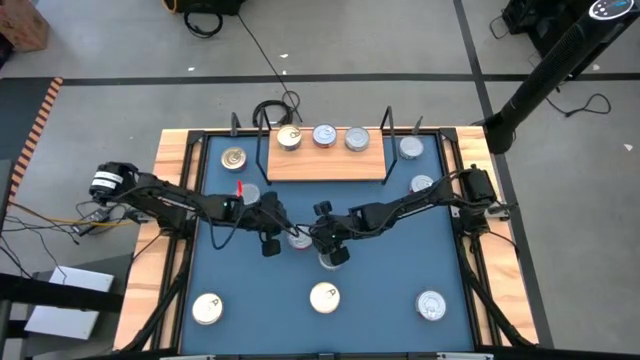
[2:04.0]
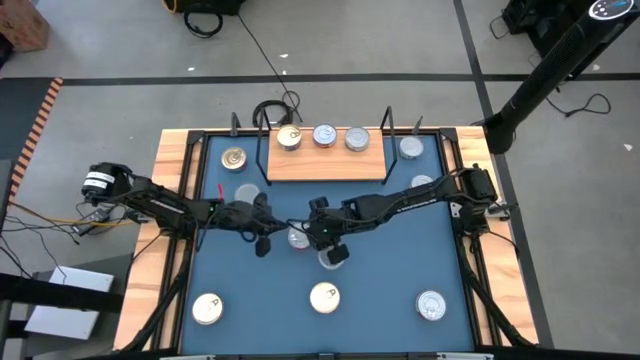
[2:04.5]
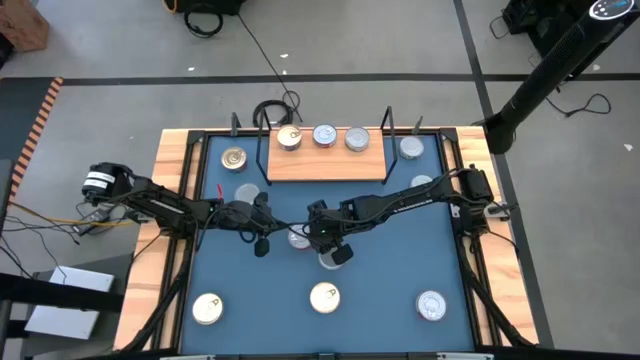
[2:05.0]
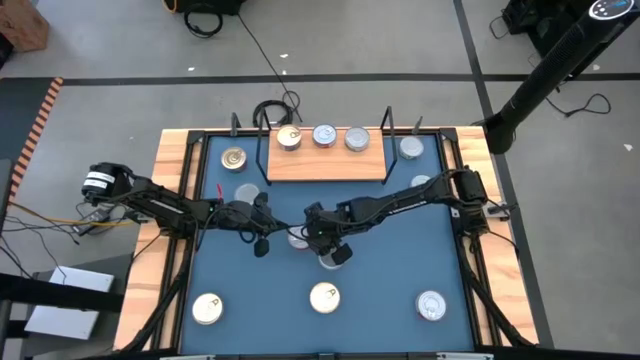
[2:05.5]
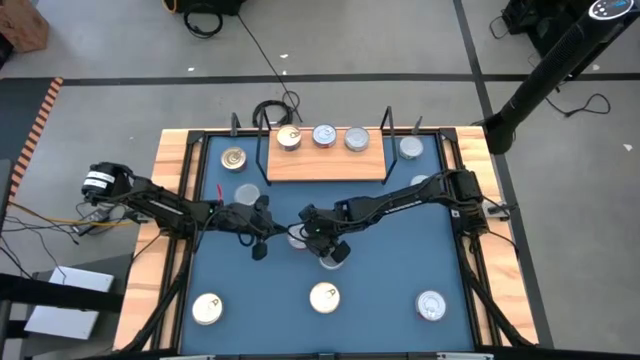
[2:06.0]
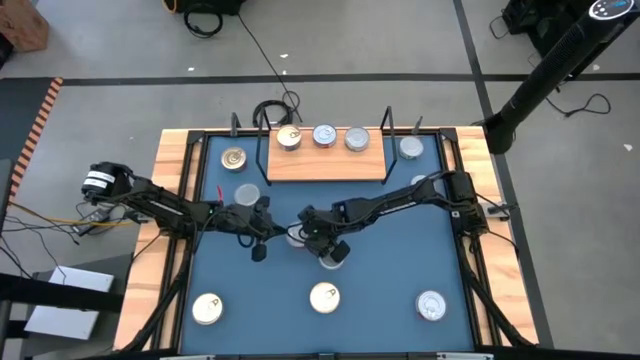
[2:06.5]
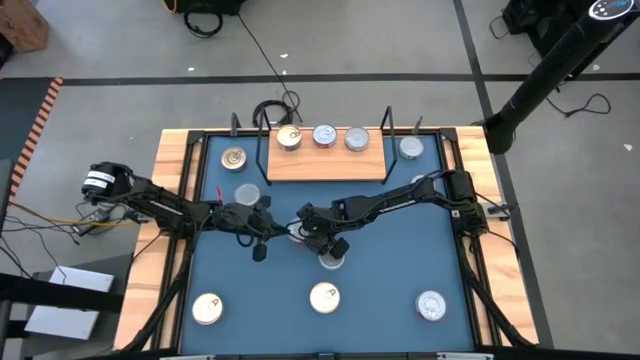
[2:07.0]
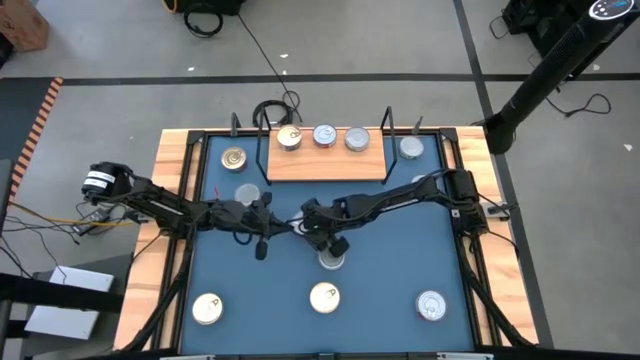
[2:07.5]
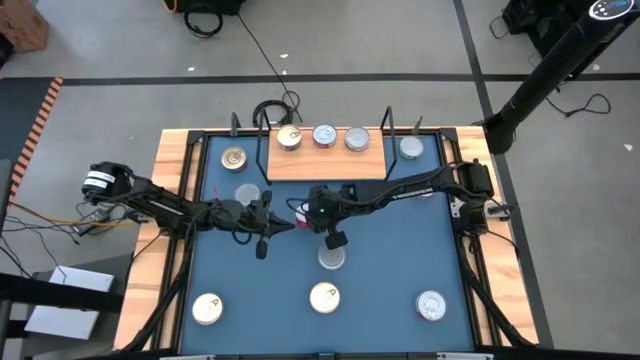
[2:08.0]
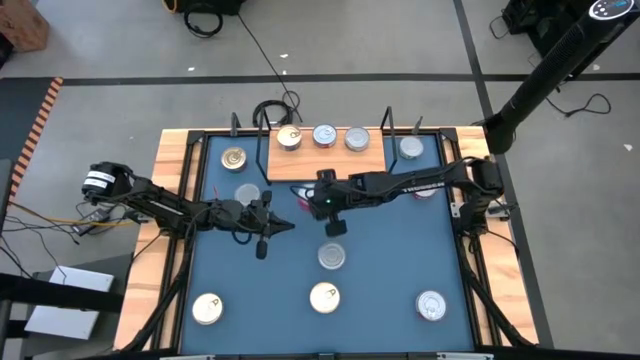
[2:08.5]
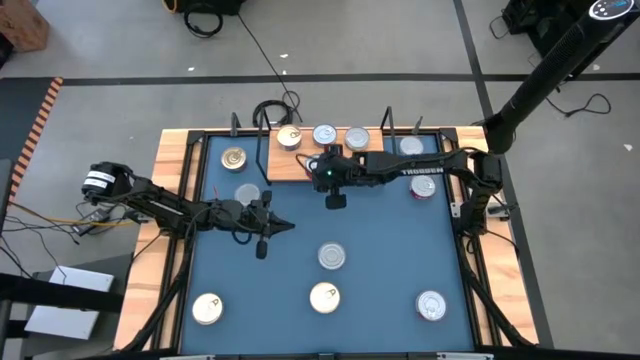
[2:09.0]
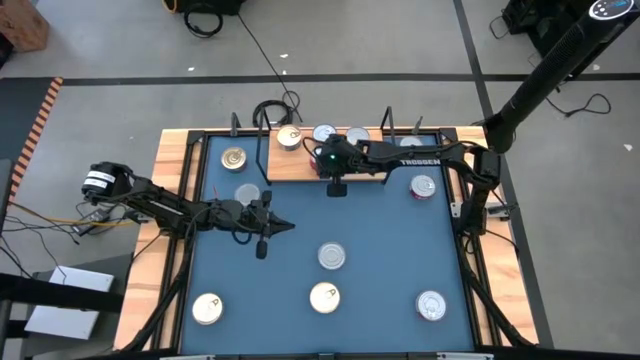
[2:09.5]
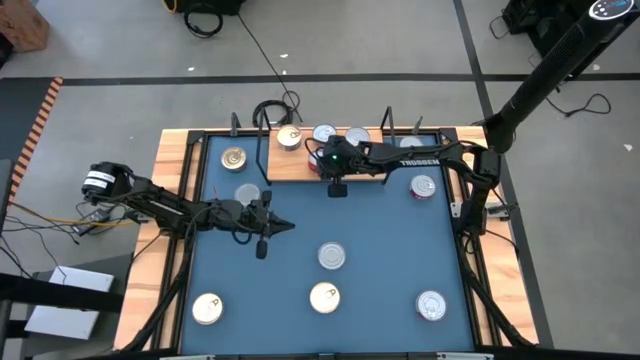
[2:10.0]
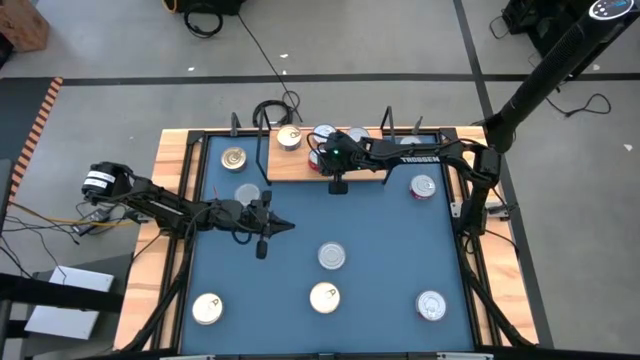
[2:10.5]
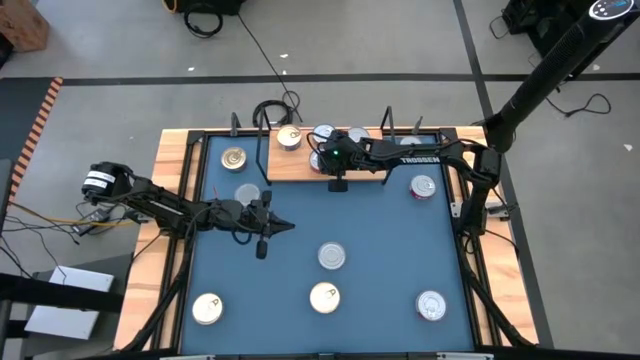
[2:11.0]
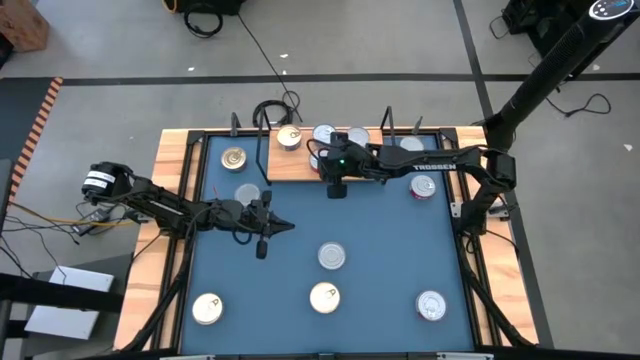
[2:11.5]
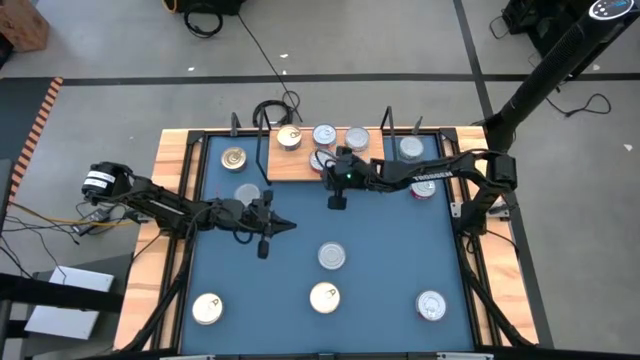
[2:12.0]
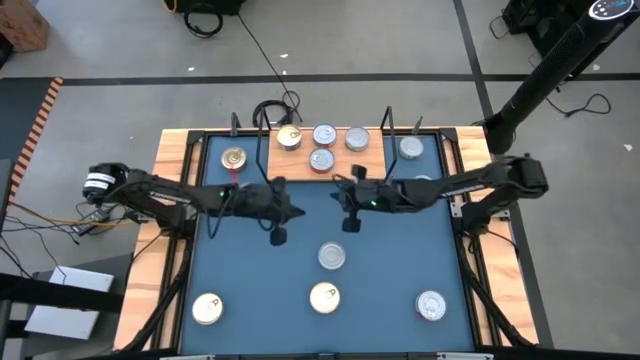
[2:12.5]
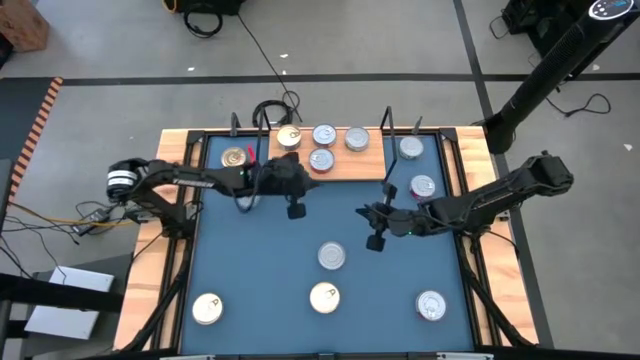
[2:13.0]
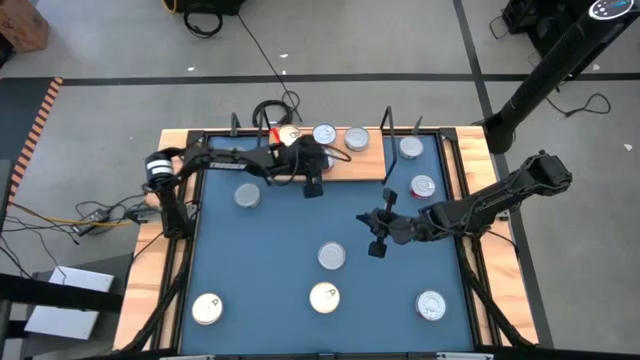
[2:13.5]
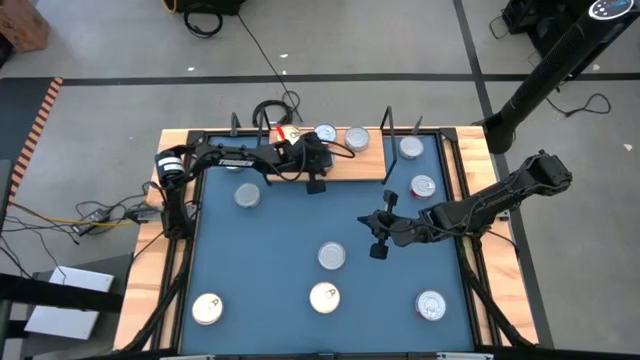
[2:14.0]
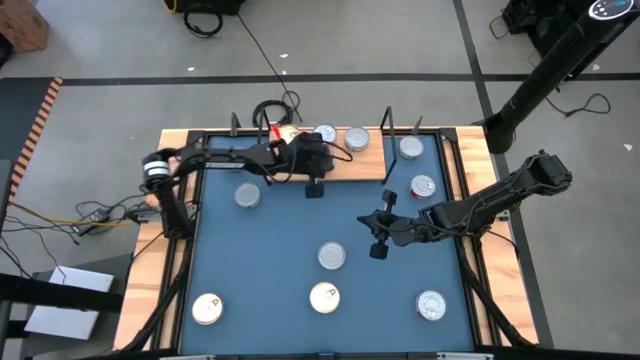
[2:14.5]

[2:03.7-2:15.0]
Task: Stack canned seafood by type on shelf
Put the middle left red tuna can on the shelf

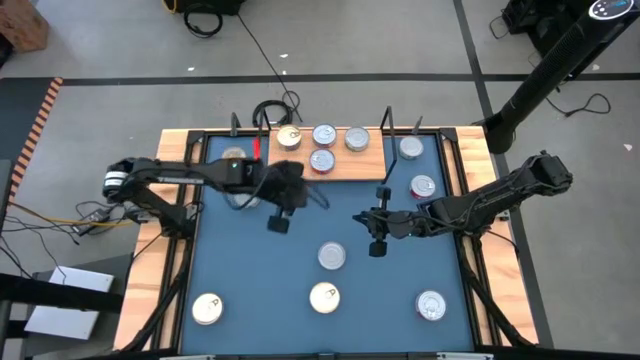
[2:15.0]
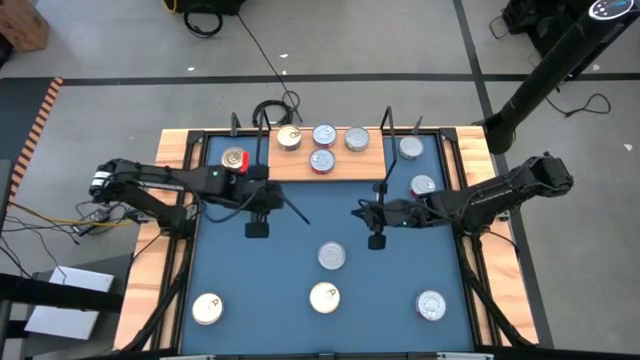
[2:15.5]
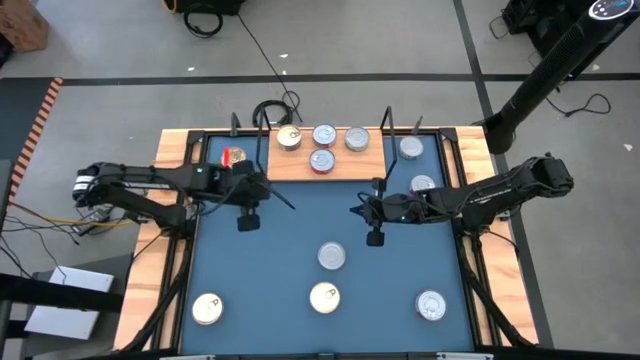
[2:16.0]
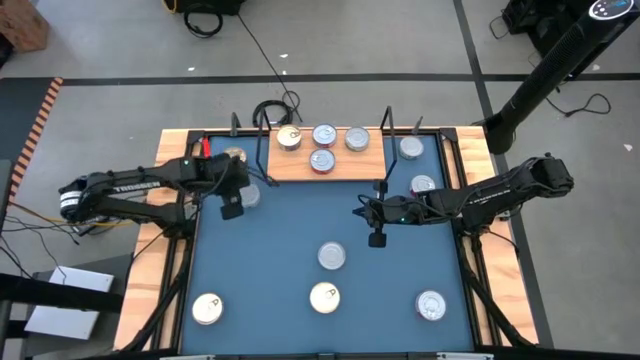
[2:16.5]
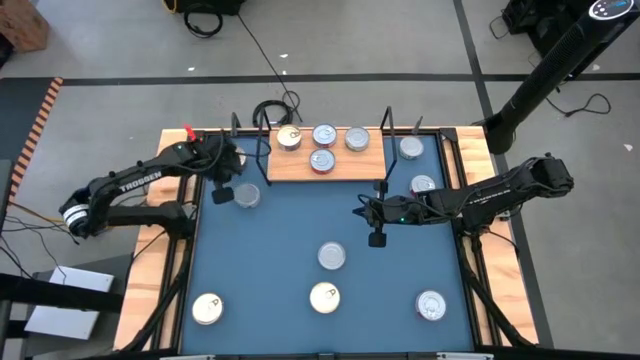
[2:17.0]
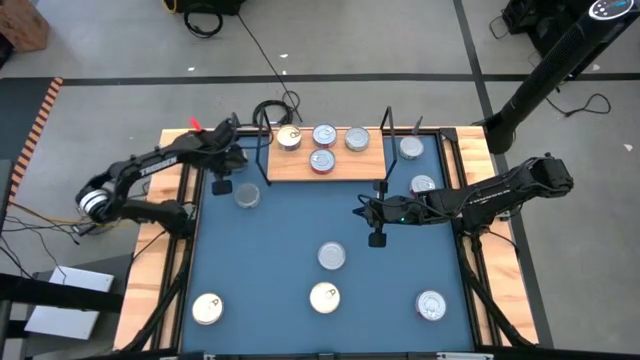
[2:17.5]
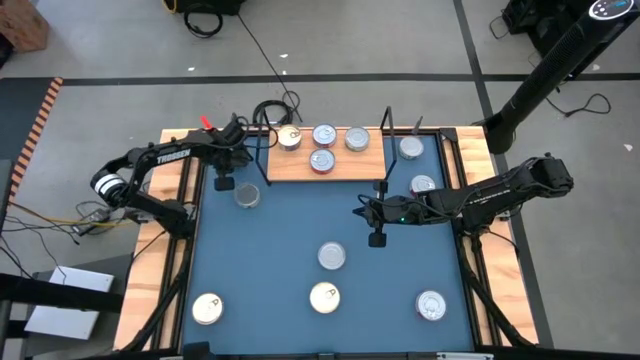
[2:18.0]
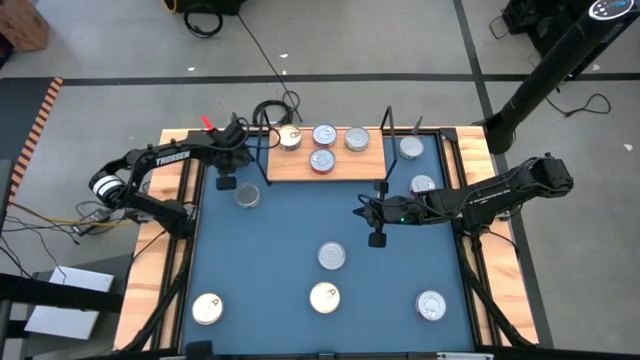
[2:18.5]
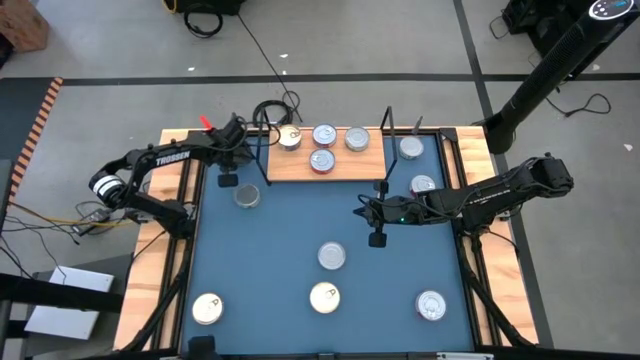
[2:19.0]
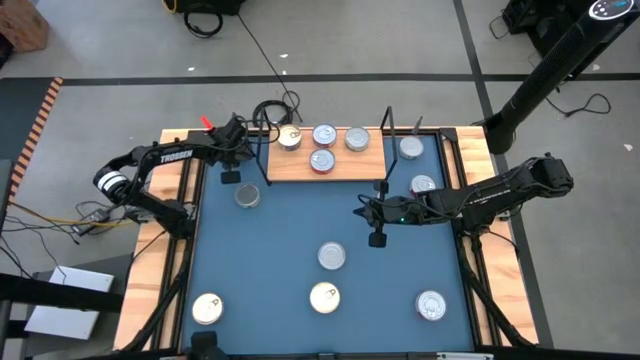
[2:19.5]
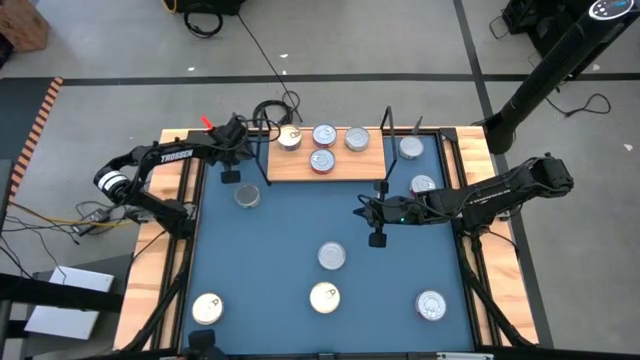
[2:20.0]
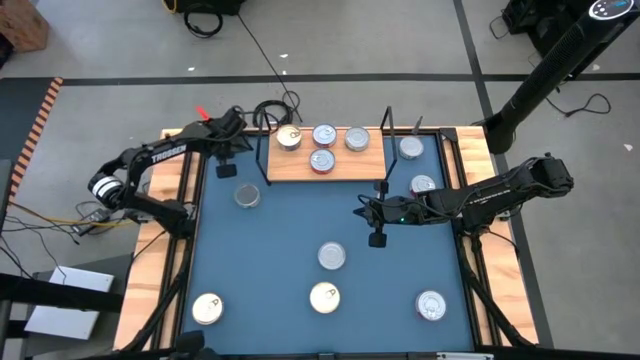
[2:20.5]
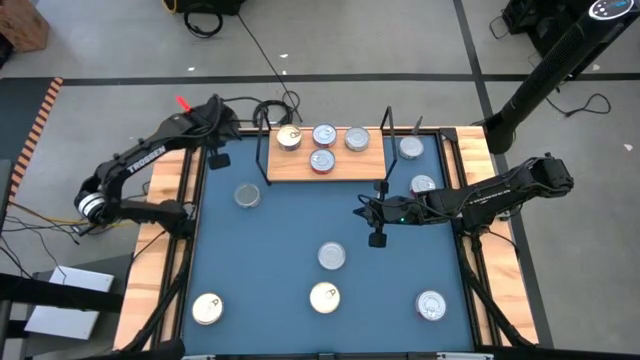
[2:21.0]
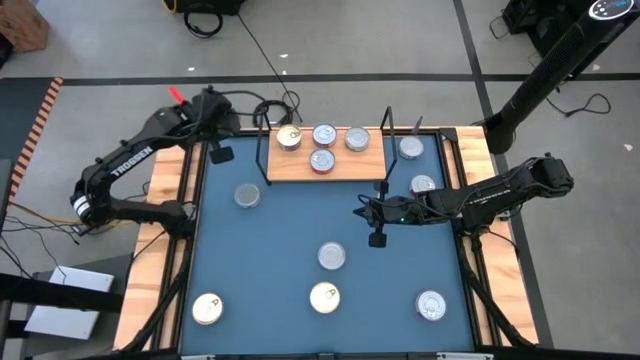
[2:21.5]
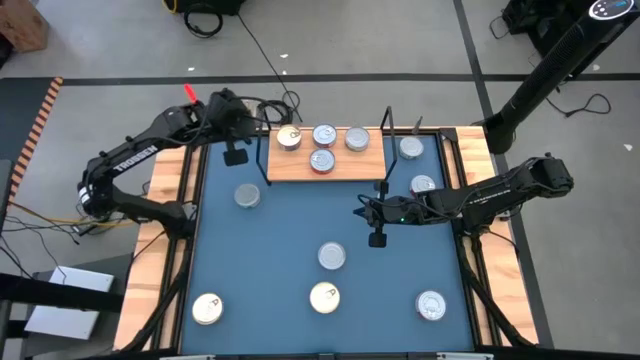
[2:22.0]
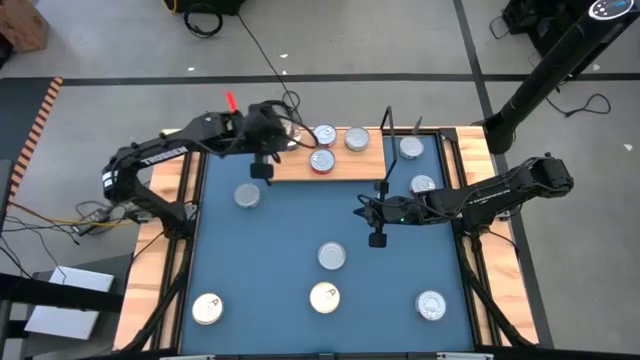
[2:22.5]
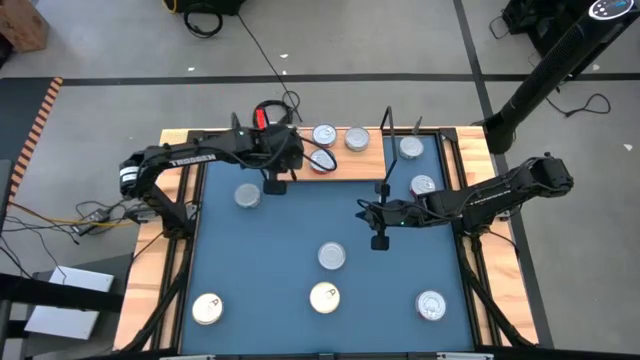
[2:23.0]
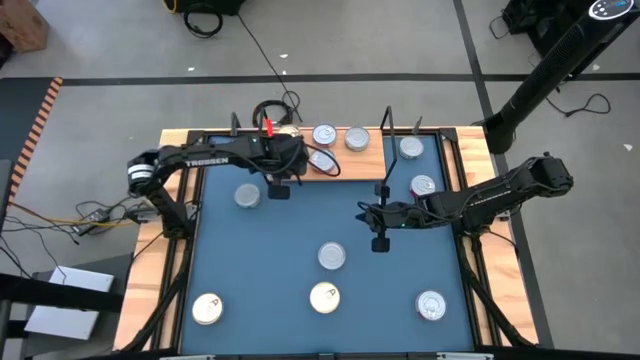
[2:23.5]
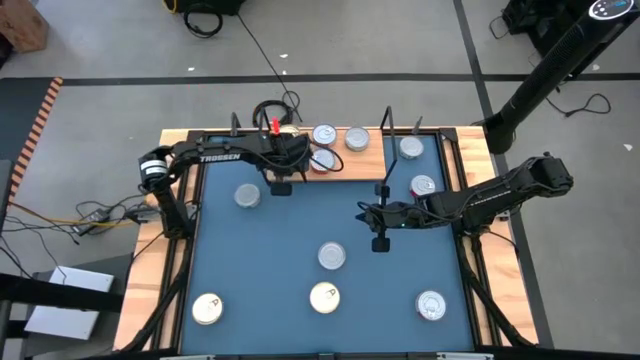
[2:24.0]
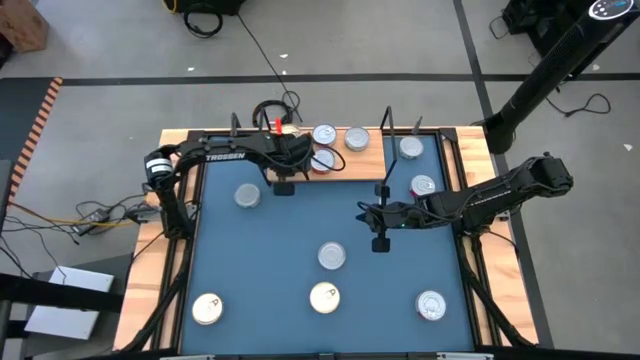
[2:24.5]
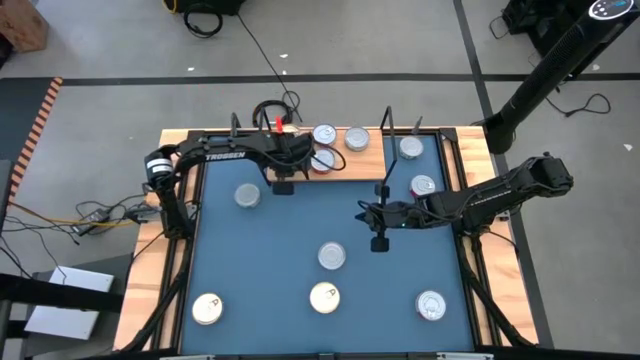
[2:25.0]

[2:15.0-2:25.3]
Put the top blue tuna can on the shelf
